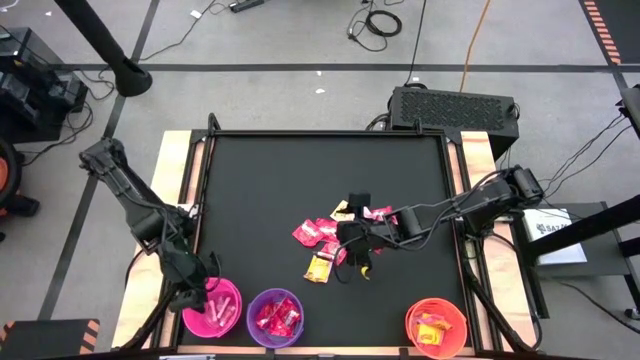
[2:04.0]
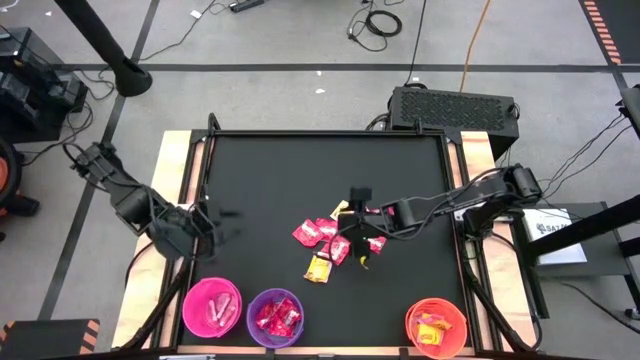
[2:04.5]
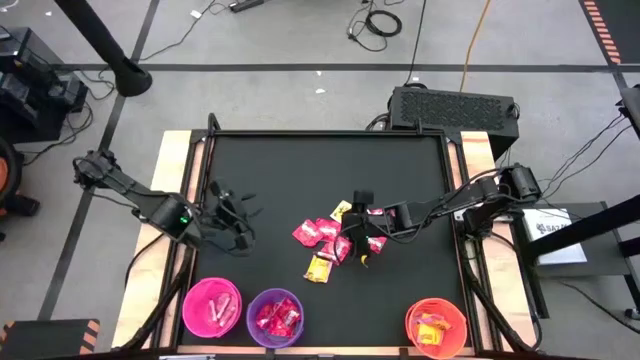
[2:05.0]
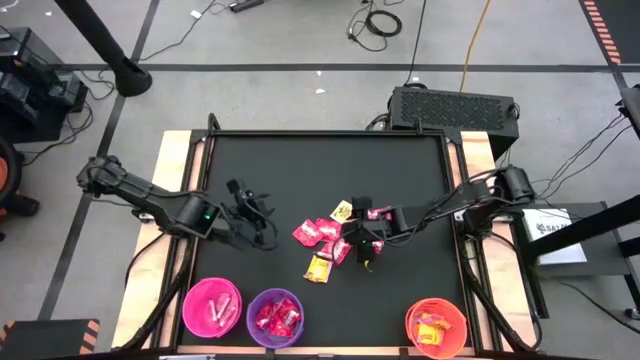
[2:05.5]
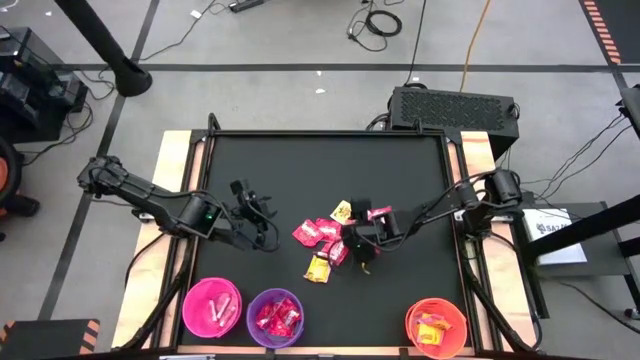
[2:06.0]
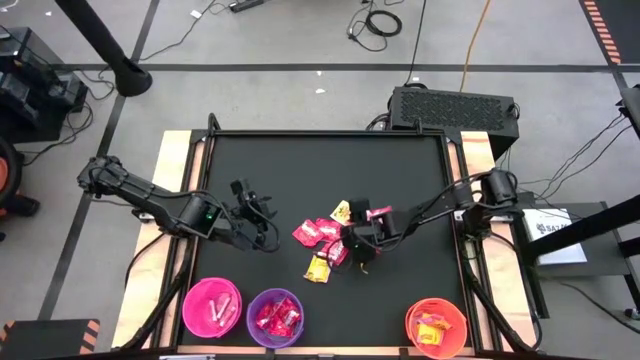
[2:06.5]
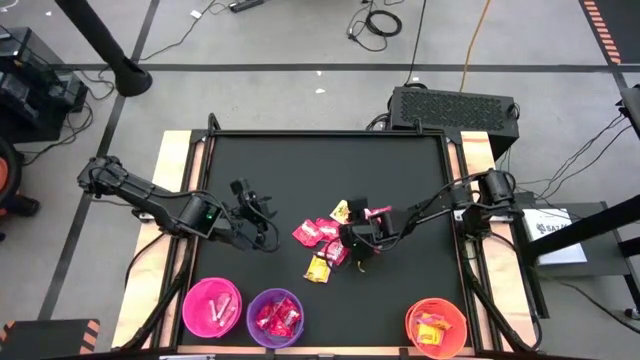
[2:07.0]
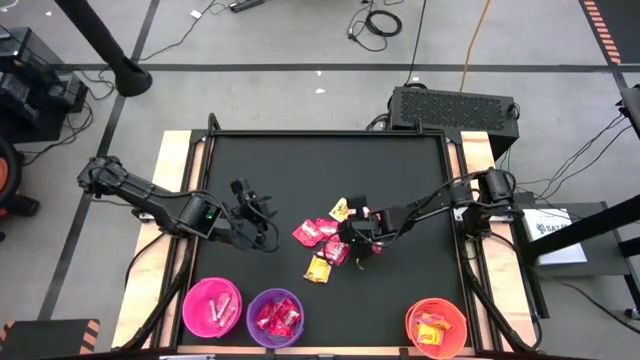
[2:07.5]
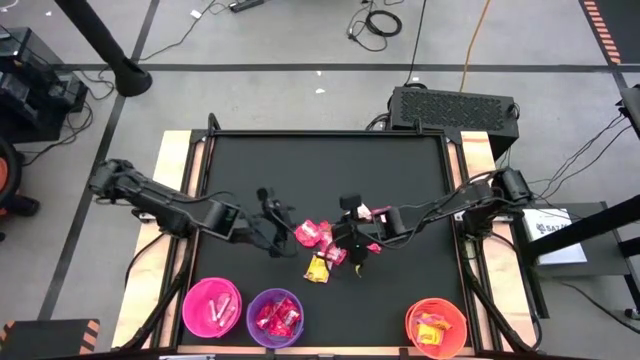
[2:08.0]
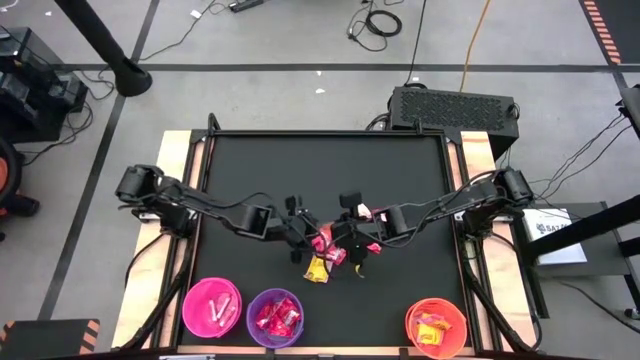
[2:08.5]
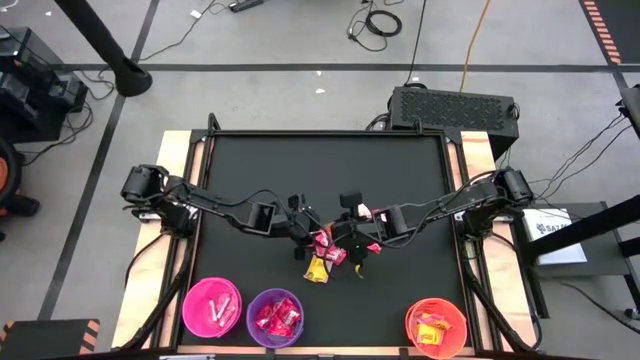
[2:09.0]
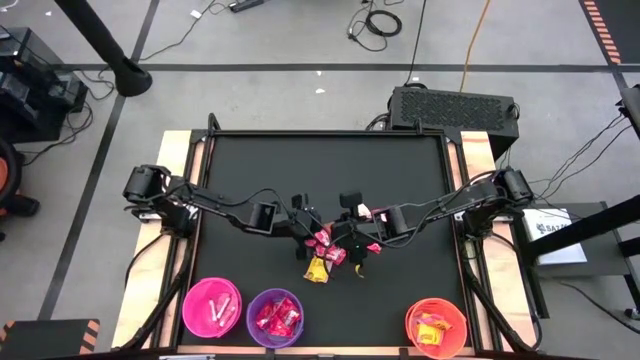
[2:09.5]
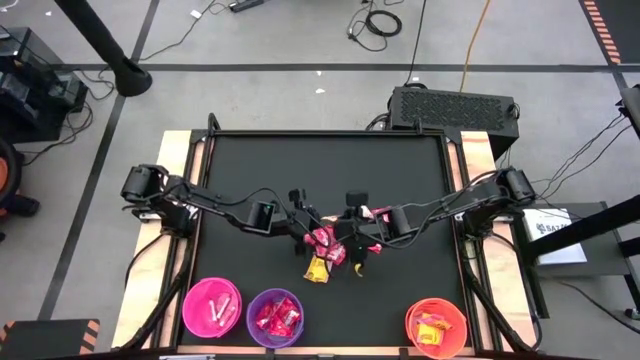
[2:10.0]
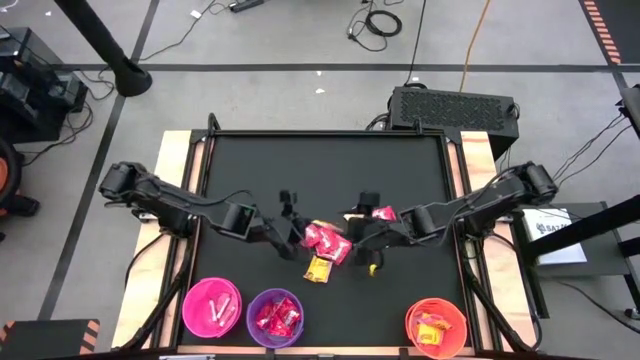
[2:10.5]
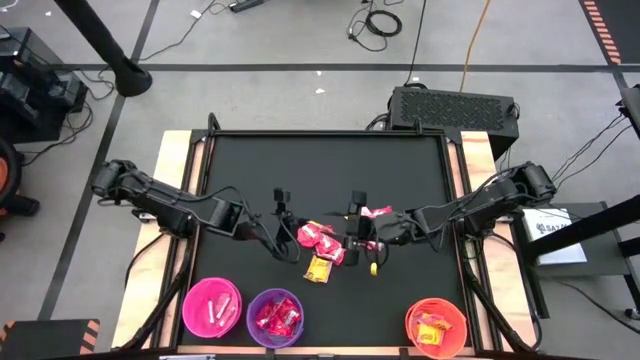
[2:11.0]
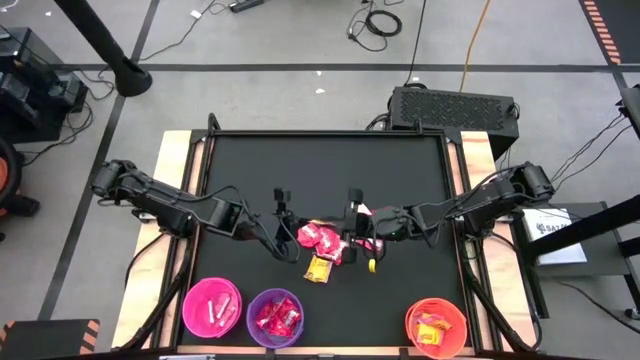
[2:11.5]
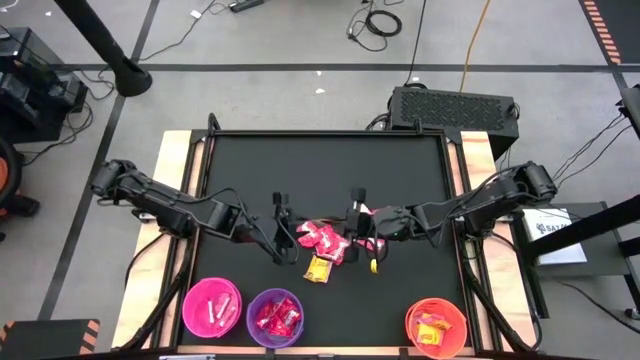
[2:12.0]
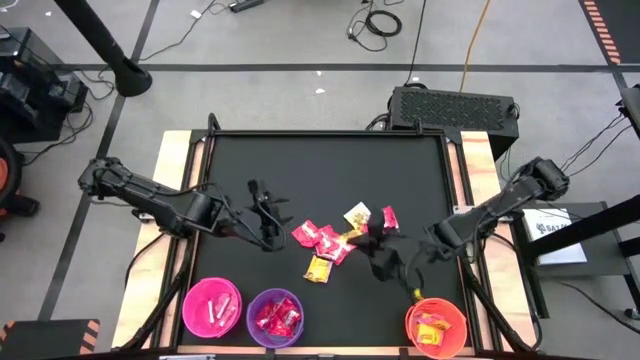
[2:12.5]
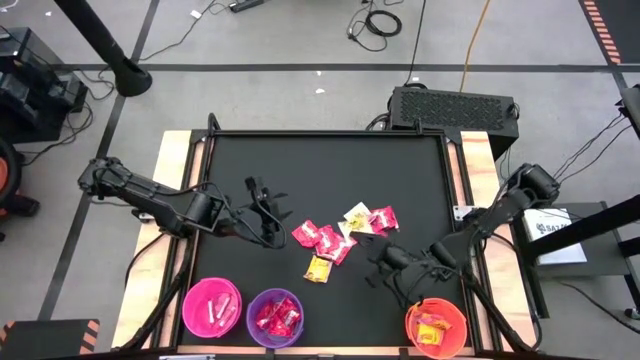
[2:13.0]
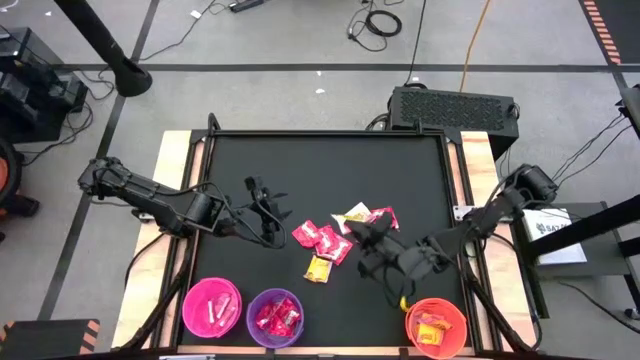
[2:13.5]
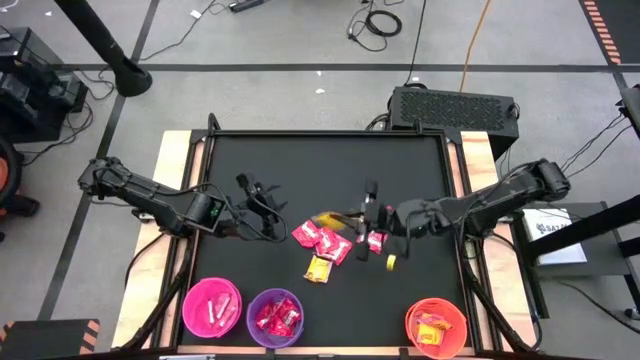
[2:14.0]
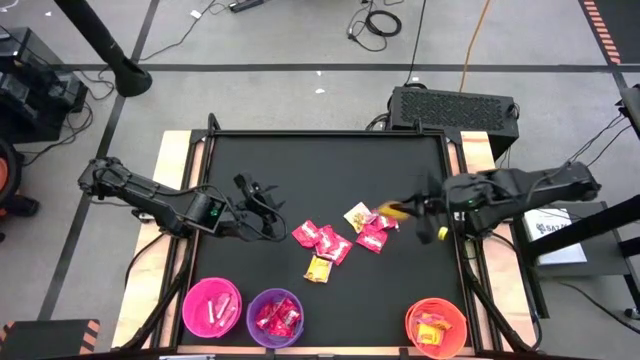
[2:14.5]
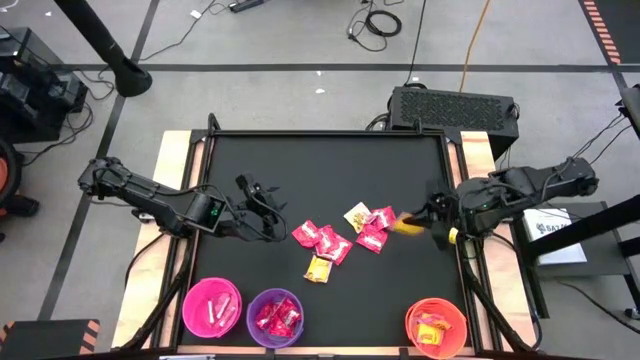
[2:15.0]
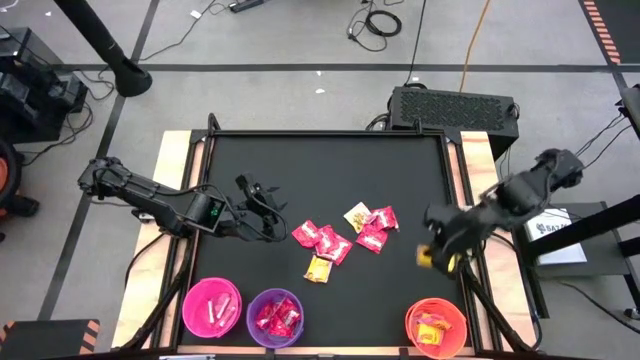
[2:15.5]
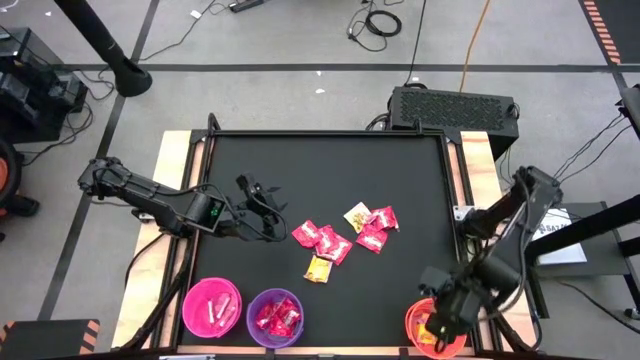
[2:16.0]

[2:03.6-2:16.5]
Task: Sort candy by brand, put in halloween buckets
Put the yellow candy into the orange bucket

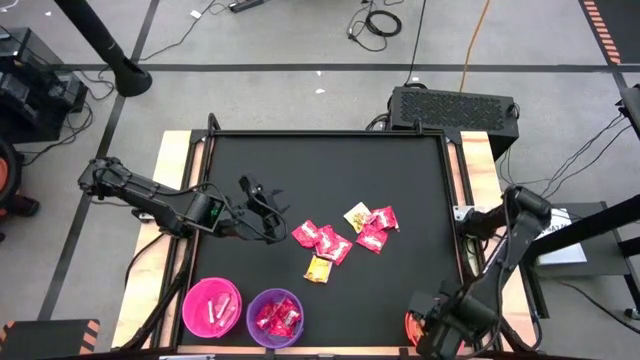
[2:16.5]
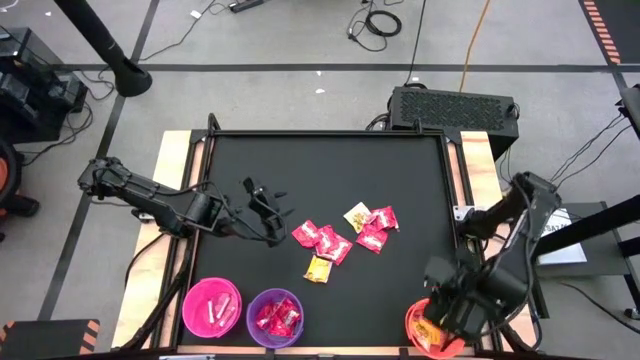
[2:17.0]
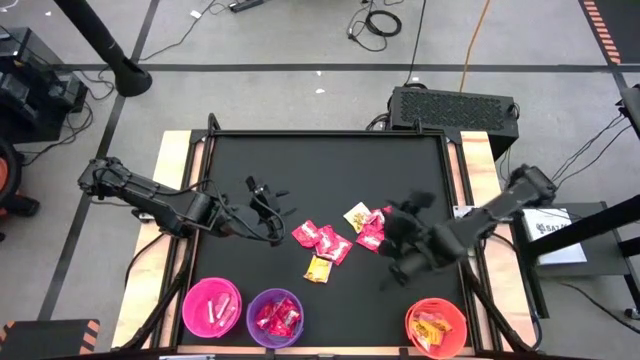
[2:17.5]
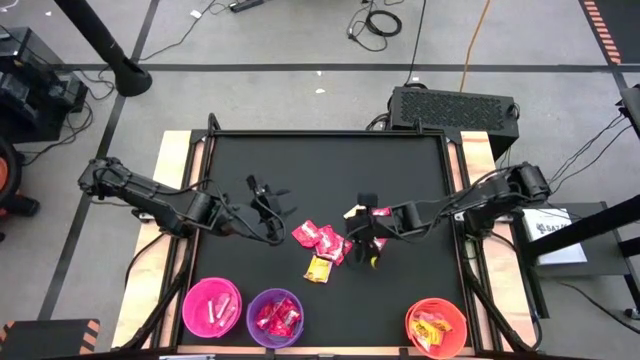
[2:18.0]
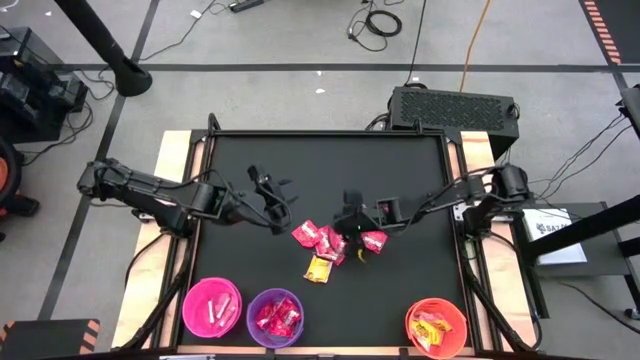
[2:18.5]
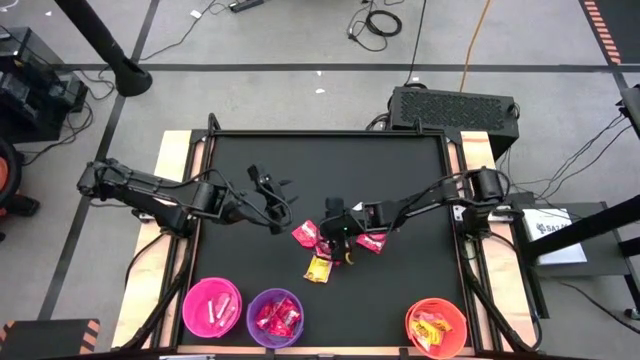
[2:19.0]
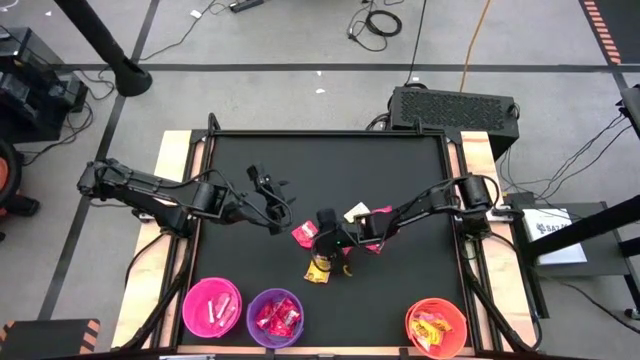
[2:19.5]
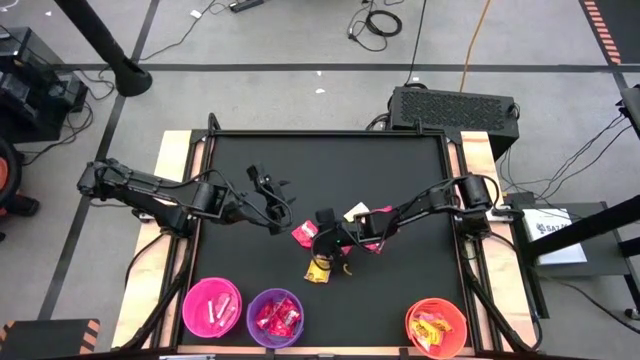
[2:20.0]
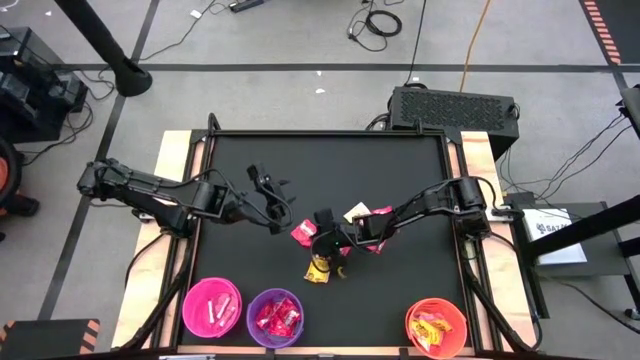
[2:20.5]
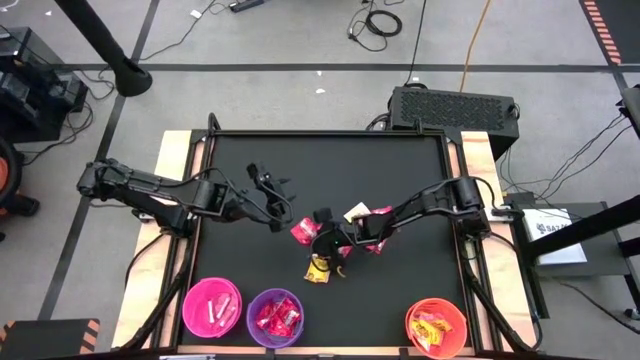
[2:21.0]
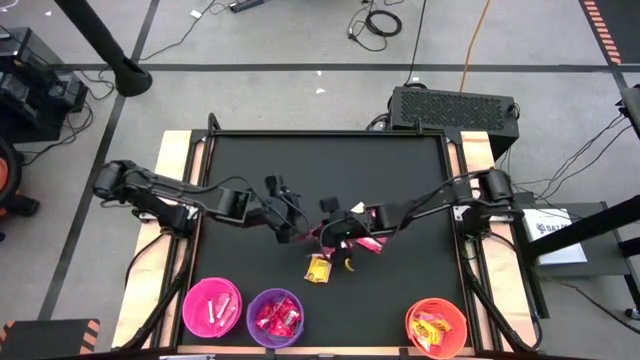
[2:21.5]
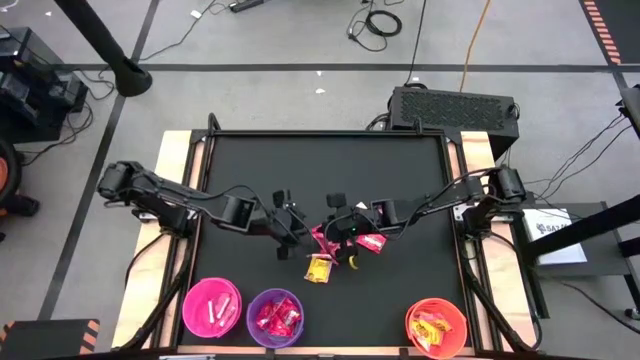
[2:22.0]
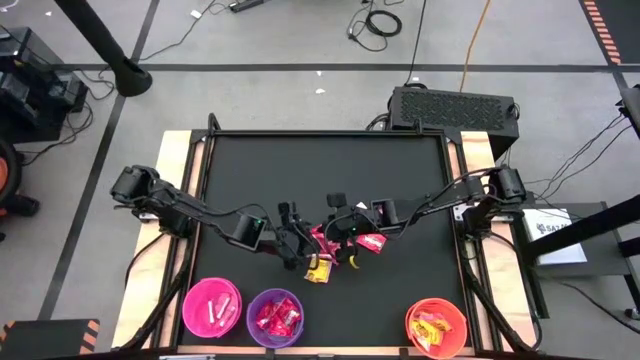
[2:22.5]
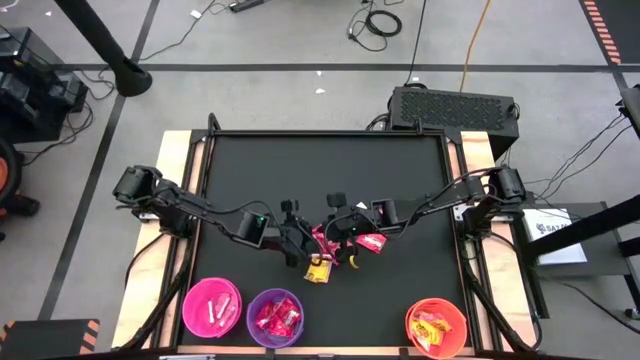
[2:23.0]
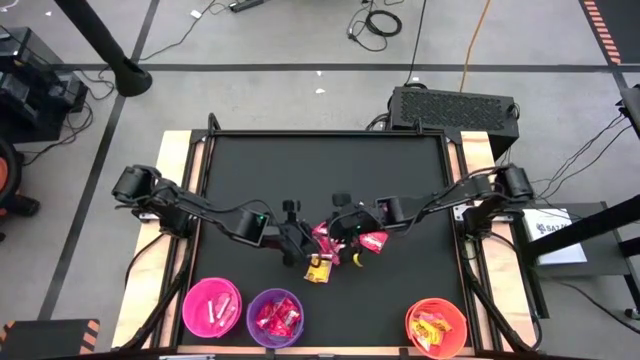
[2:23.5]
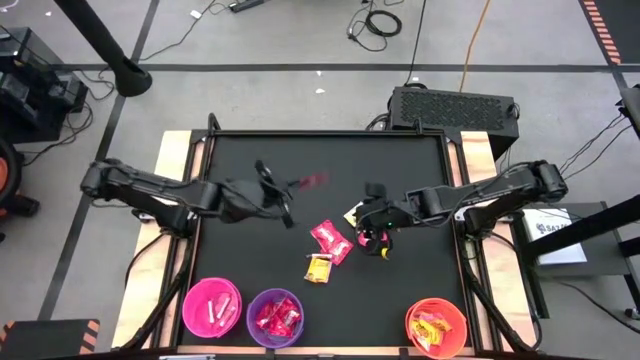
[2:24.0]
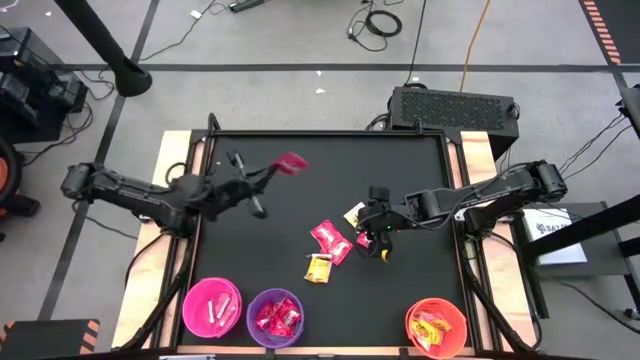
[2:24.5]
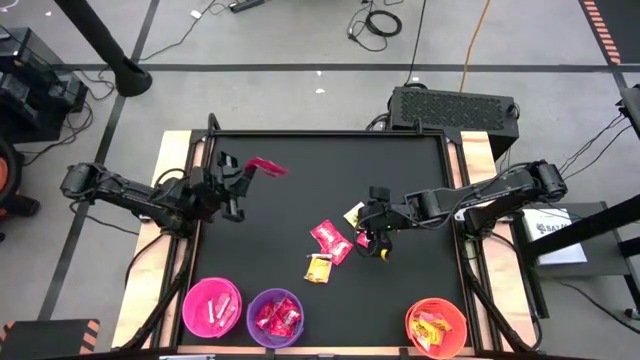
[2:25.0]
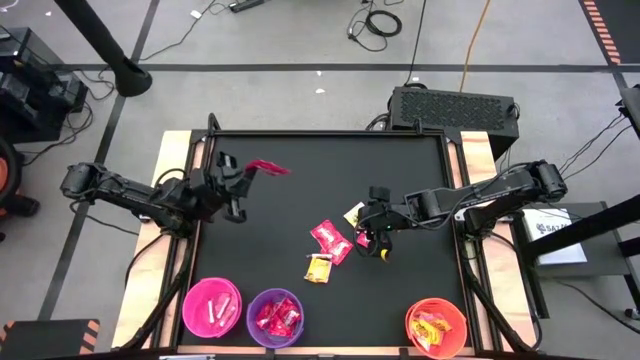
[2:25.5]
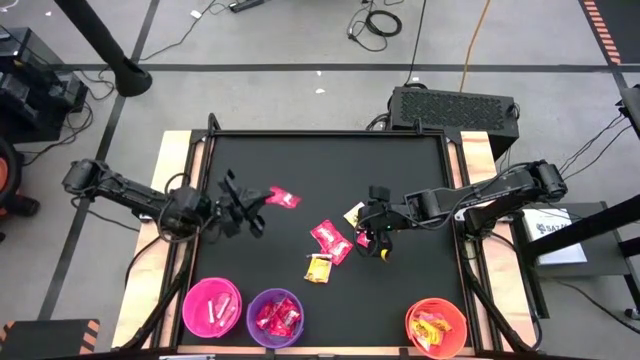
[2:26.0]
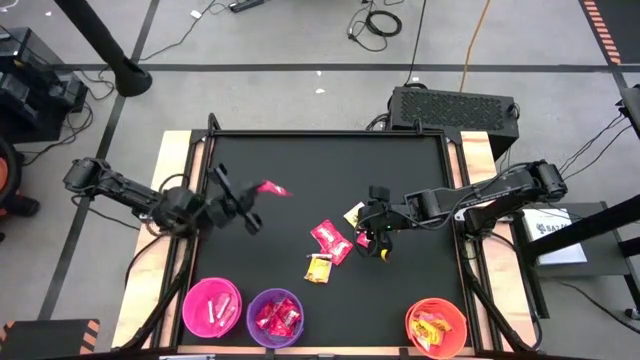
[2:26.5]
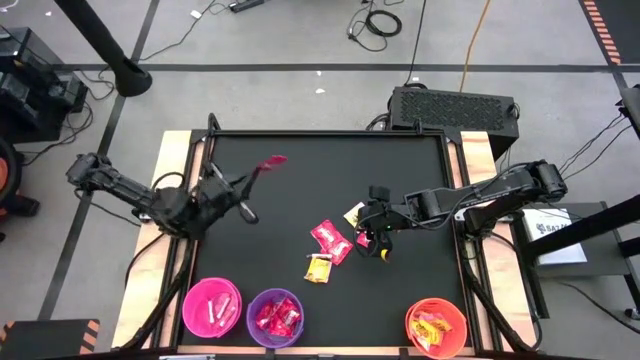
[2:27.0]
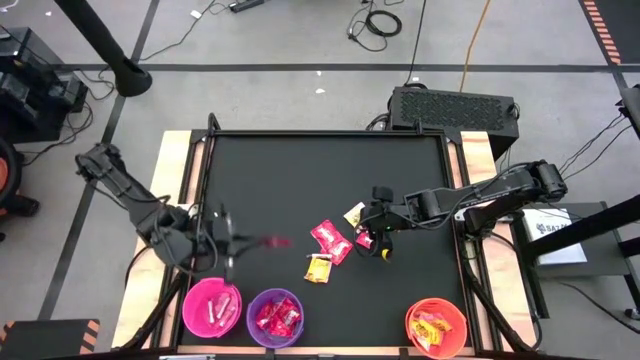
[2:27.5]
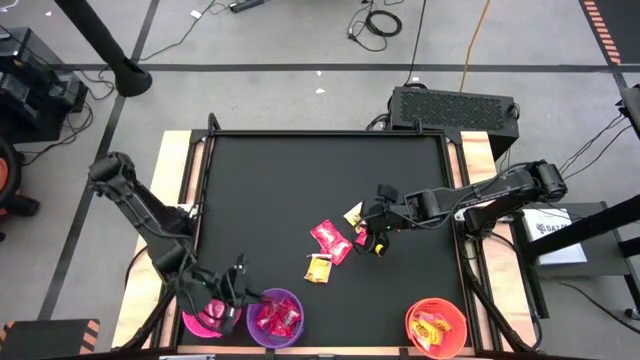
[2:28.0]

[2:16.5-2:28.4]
Put the red candy into the violet bucket
